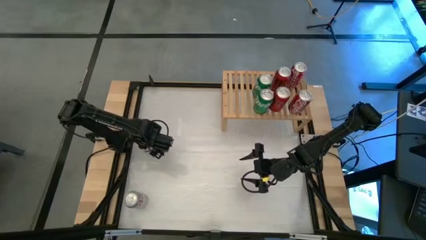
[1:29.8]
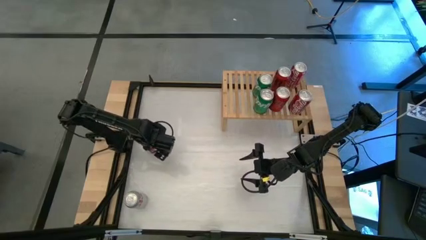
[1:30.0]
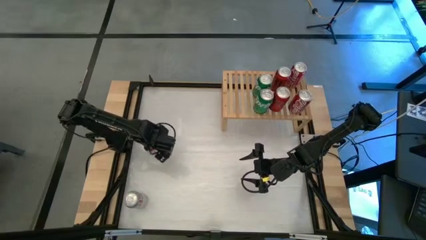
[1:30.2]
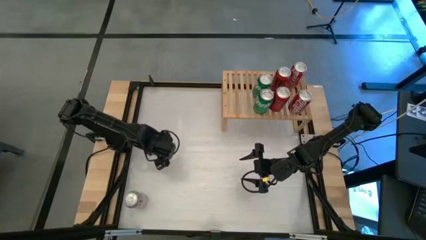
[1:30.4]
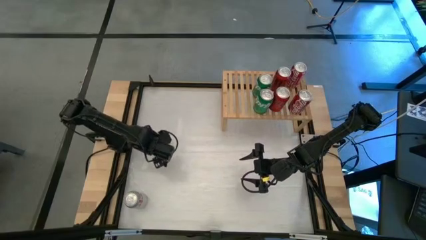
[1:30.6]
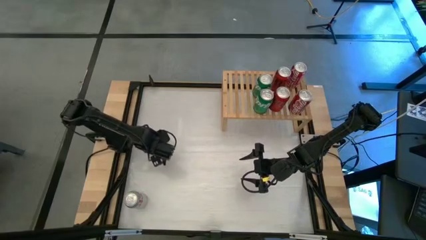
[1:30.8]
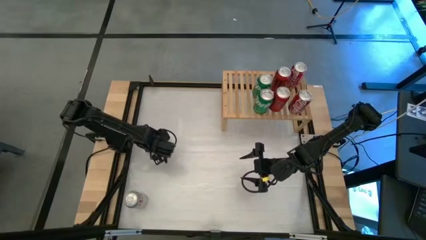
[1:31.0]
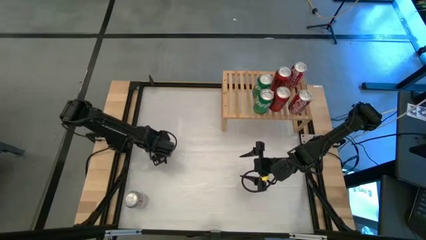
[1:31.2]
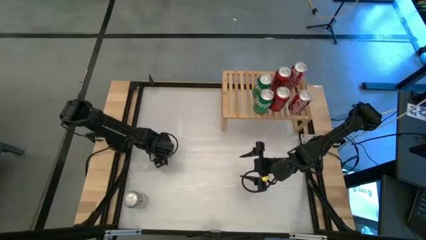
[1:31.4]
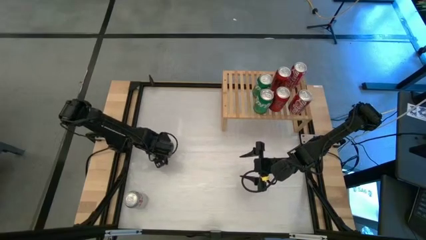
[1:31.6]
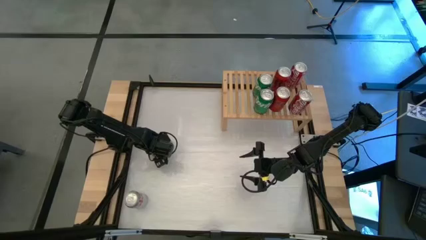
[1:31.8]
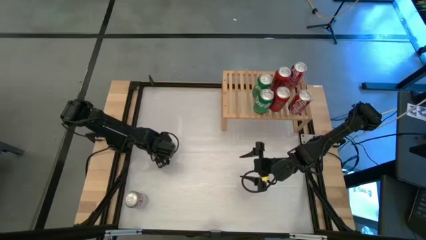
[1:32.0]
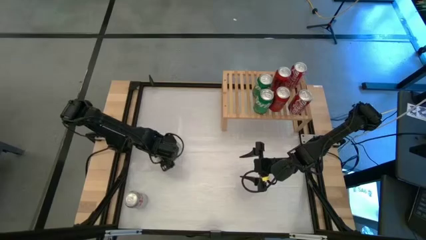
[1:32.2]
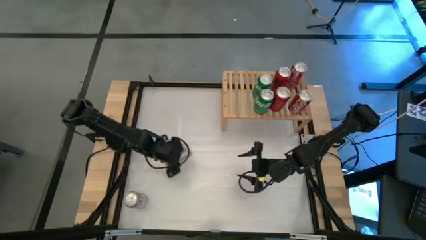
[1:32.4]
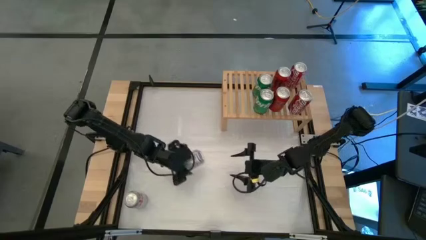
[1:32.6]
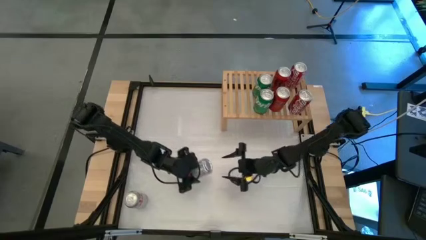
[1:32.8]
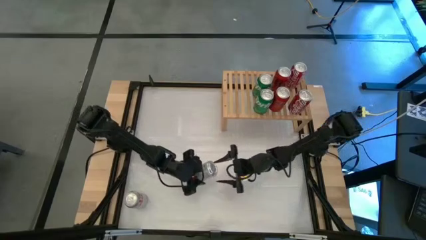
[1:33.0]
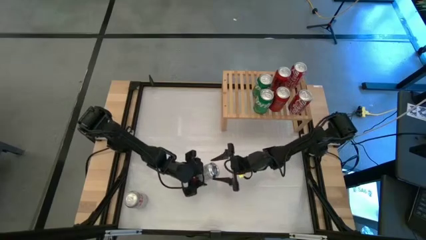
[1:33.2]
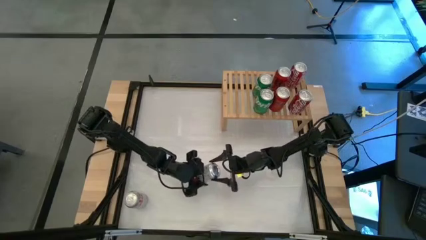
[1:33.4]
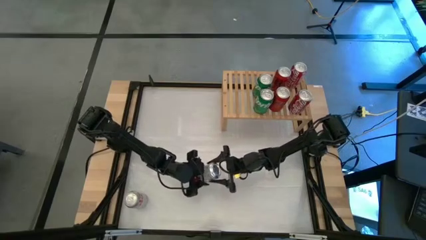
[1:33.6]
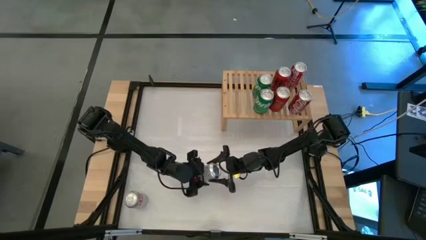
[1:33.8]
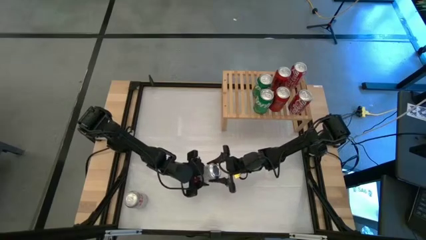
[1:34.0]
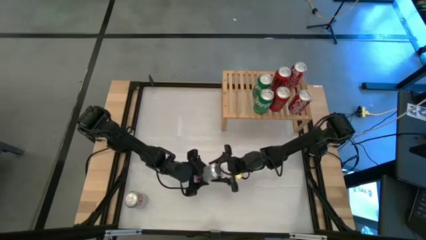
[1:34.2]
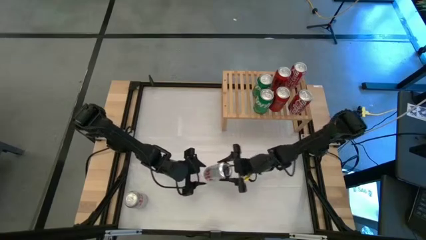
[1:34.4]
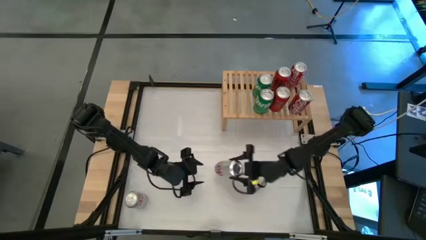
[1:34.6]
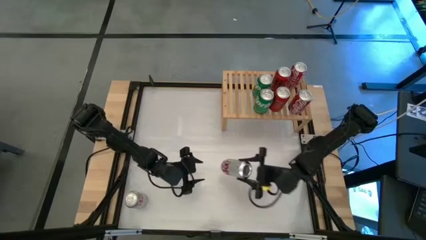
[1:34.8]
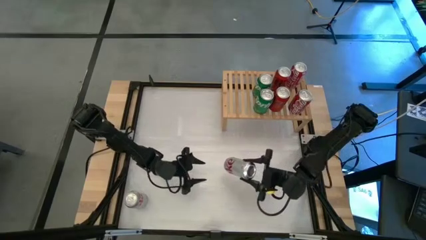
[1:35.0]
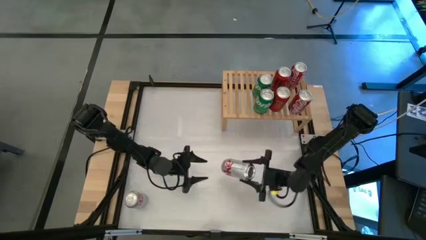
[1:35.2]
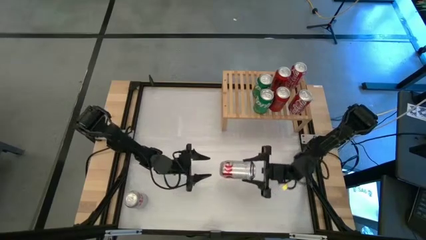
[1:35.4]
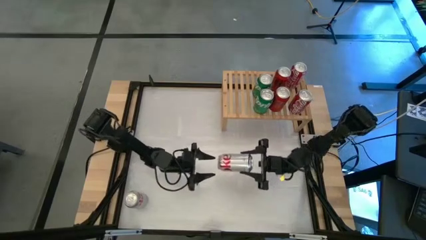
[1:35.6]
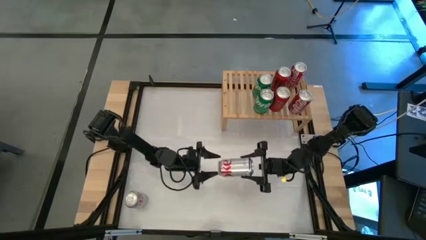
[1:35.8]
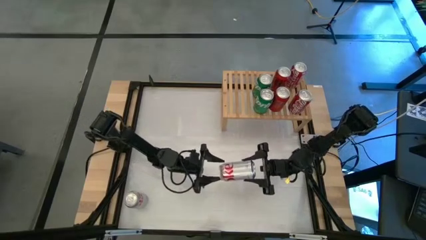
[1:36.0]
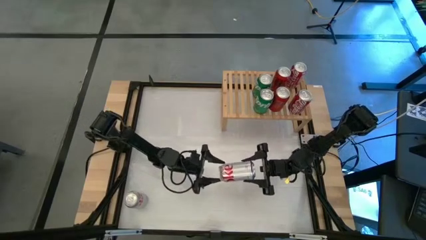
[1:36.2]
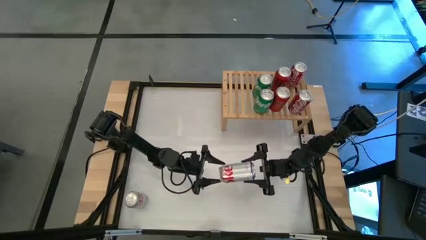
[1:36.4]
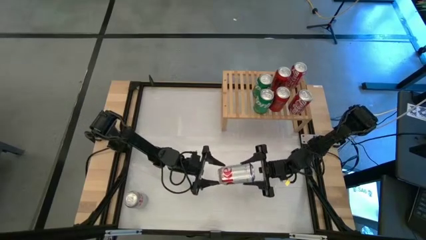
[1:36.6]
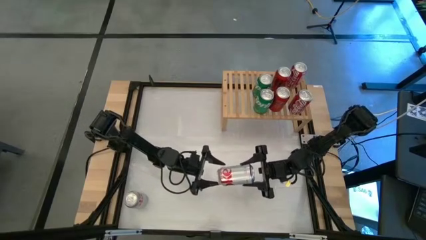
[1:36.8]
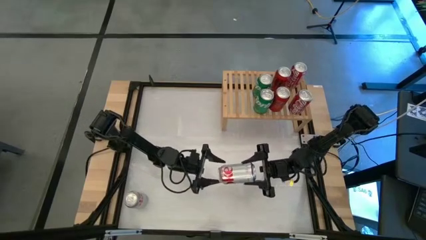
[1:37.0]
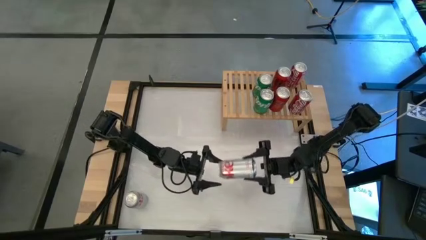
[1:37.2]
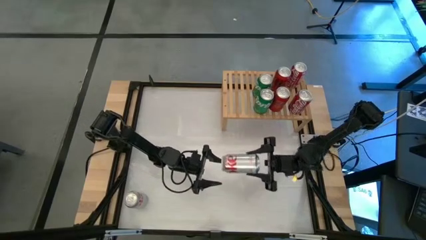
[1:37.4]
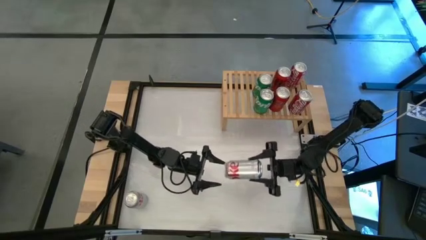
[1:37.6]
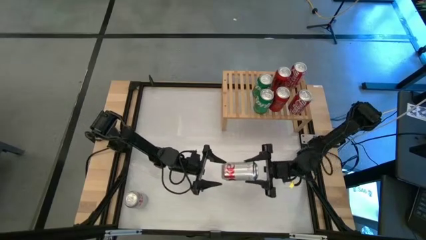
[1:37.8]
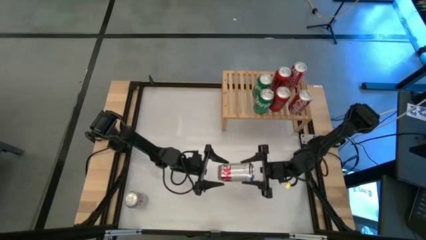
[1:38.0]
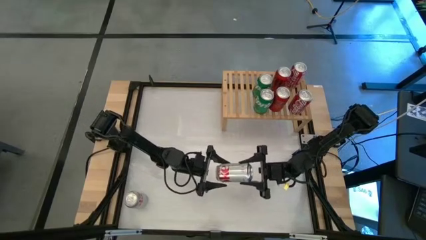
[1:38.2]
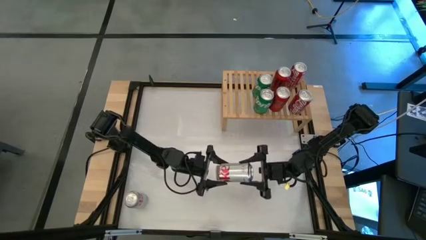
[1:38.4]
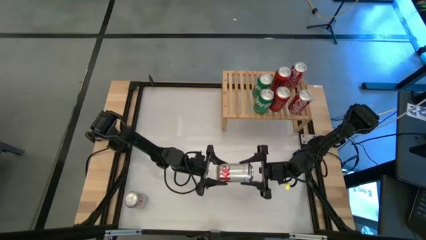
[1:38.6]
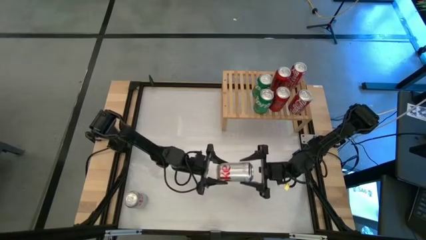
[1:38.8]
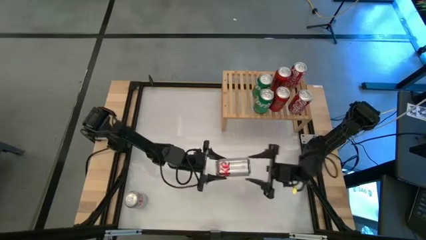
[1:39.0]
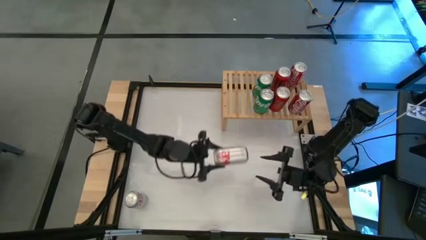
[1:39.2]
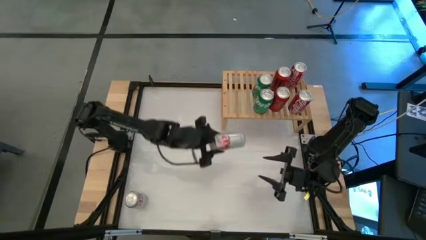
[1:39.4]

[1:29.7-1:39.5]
Task: Place canned beverage on shelf
Put the top silver soda can on the shelf

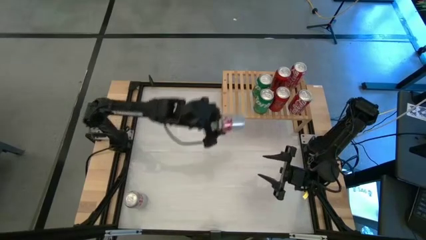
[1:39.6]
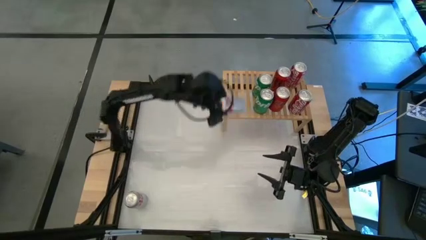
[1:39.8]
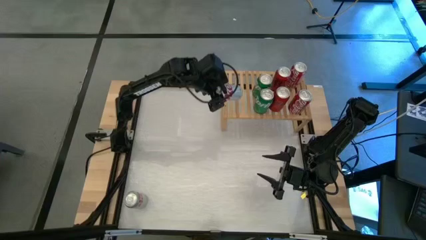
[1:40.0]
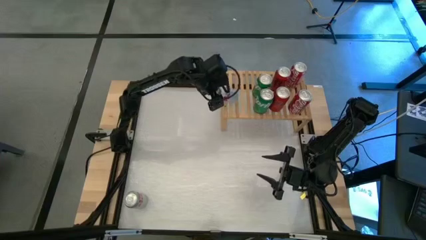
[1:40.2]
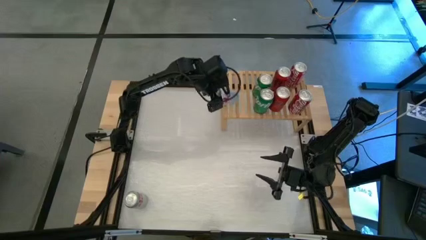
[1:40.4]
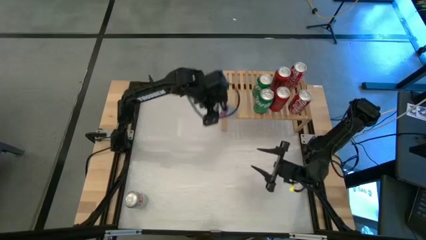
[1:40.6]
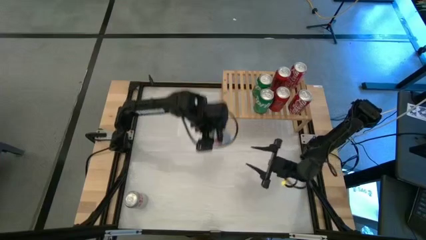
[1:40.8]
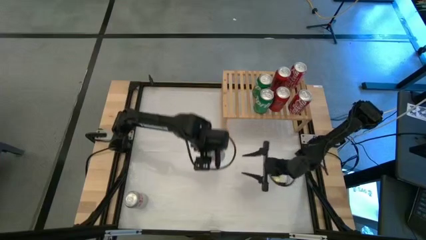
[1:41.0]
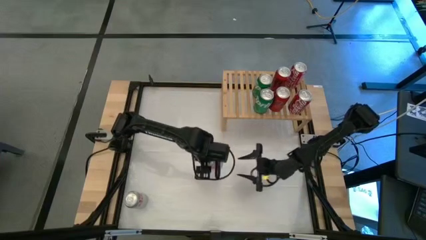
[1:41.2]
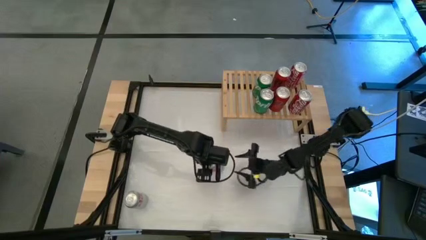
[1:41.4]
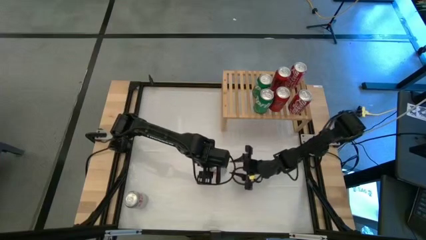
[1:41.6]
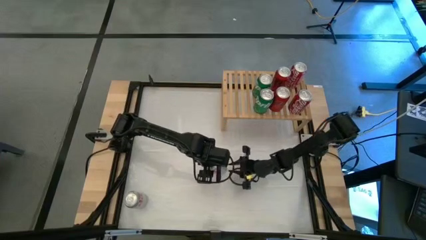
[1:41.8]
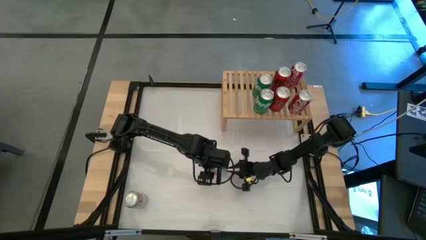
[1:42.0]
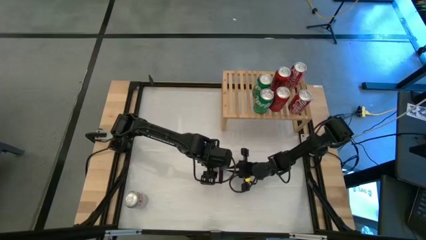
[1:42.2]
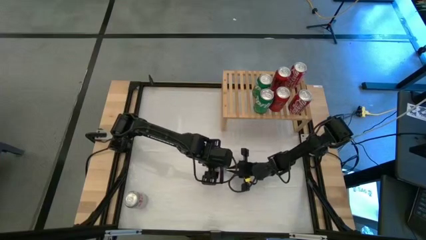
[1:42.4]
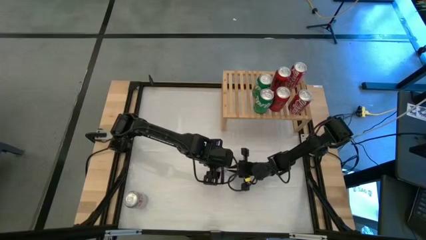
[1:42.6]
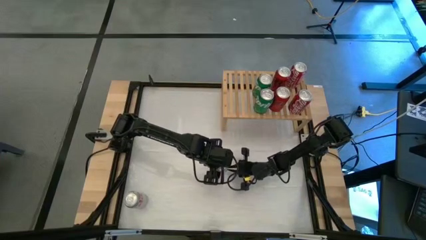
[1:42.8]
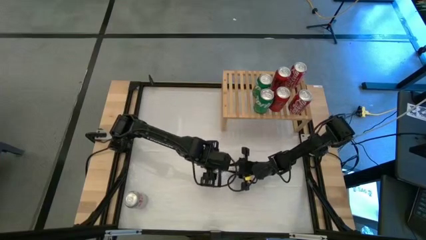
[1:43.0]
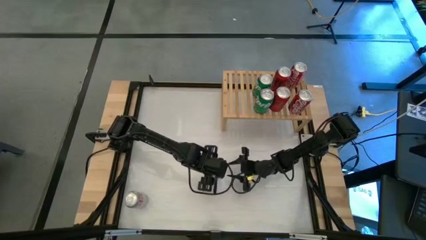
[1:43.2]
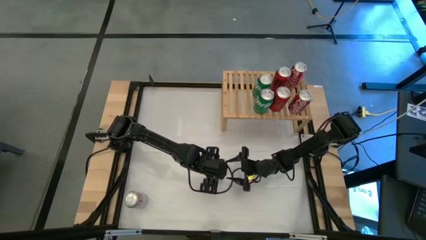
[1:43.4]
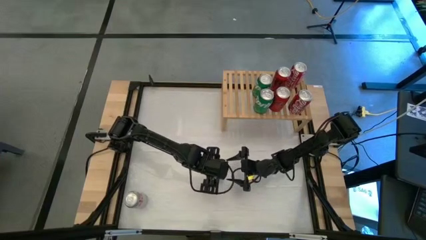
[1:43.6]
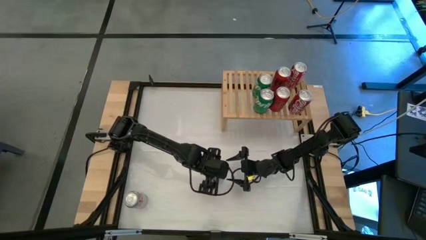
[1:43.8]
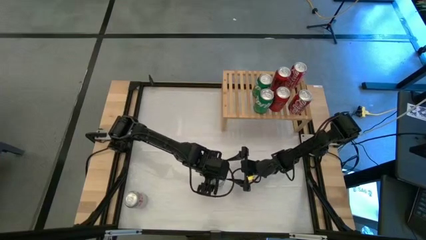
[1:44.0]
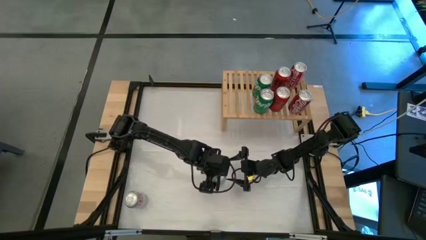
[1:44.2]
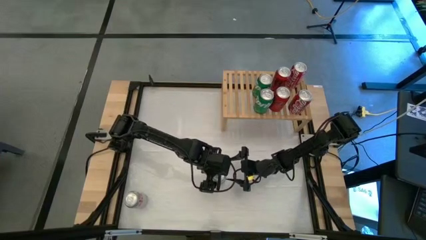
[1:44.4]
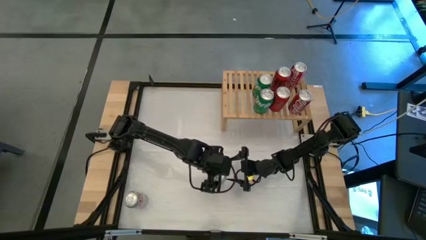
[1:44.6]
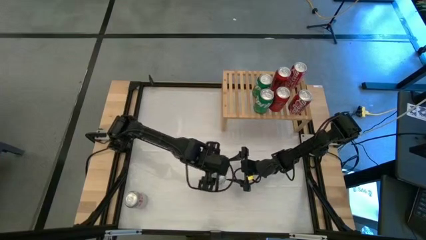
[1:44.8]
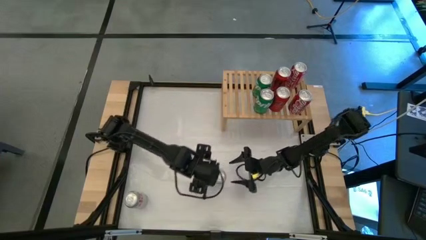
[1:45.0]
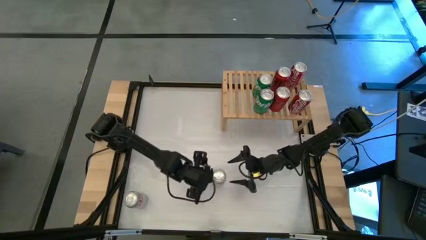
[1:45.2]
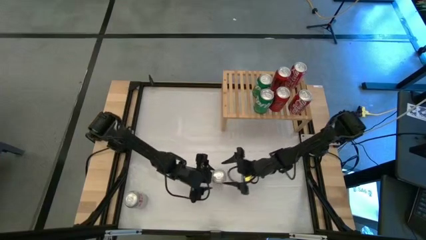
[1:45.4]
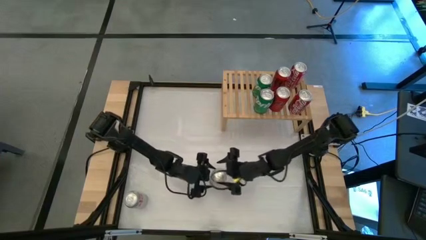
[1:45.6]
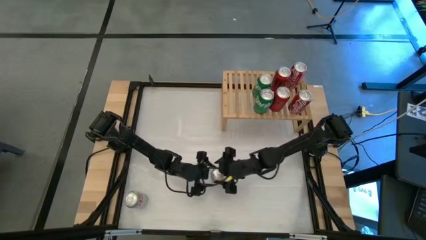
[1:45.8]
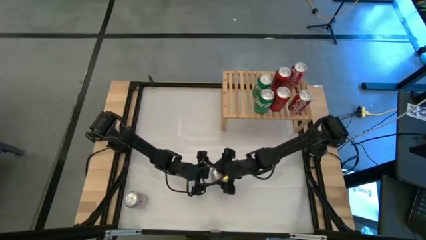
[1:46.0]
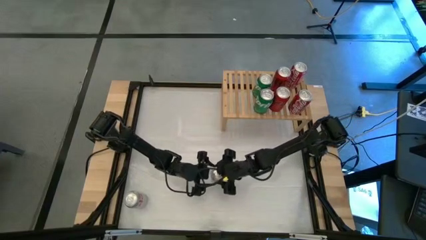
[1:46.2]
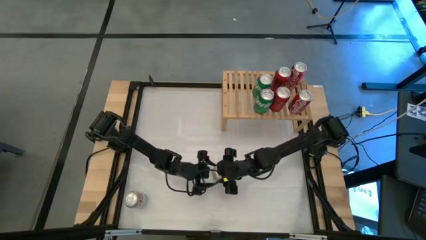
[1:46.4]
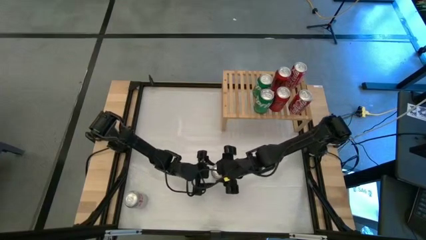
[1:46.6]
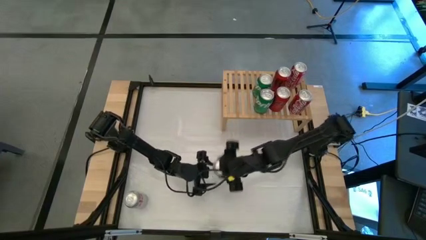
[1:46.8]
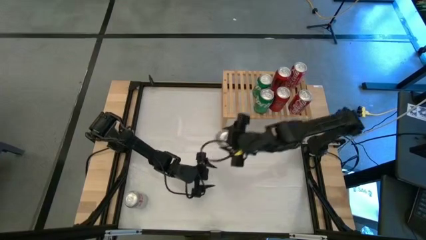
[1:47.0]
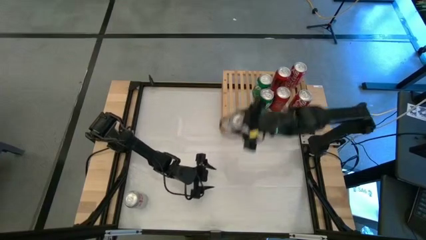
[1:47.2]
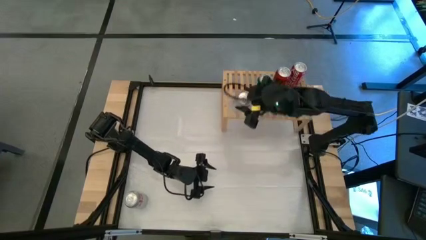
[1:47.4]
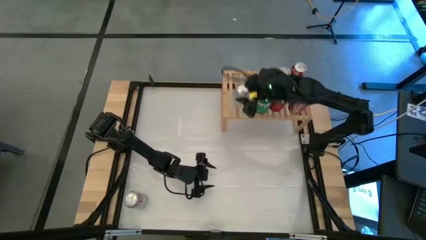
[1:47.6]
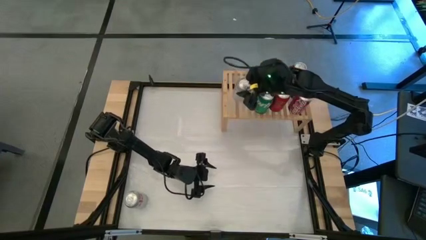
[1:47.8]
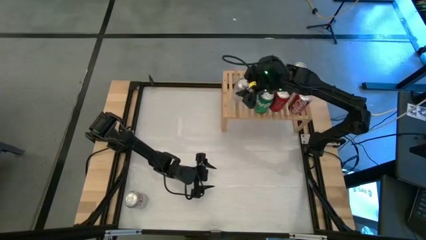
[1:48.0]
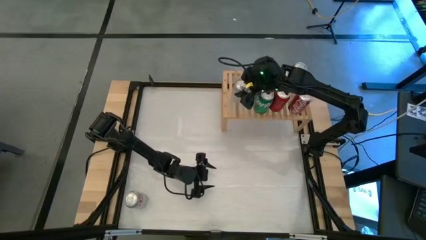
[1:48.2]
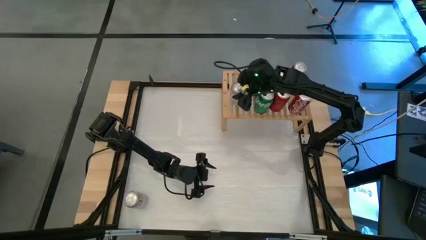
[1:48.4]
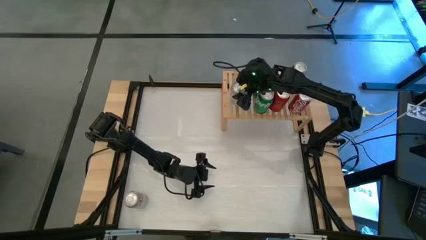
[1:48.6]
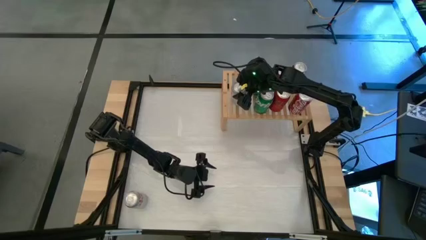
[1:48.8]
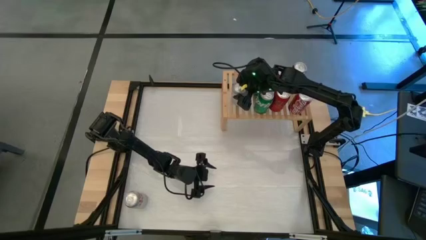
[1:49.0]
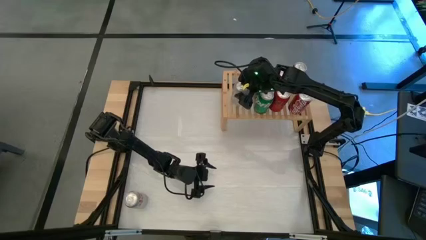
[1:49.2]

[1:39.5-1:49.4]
Put the top silver soda can on the shelf
